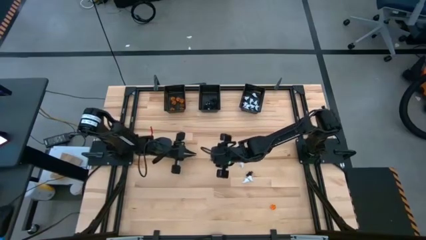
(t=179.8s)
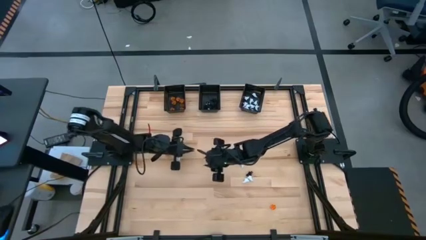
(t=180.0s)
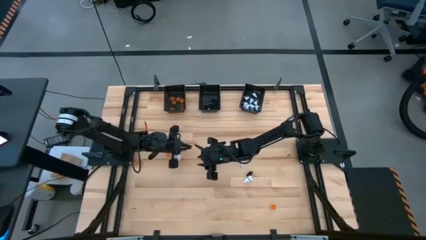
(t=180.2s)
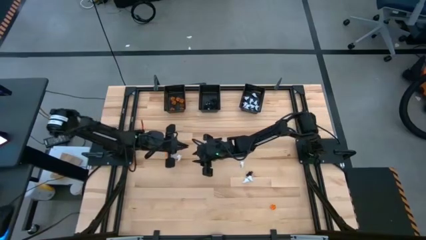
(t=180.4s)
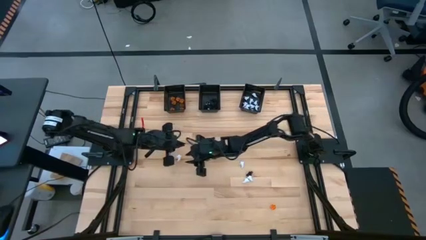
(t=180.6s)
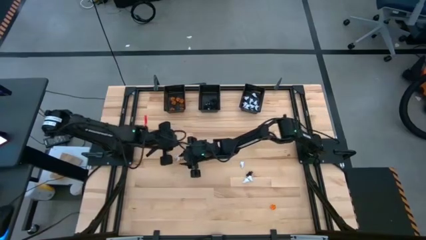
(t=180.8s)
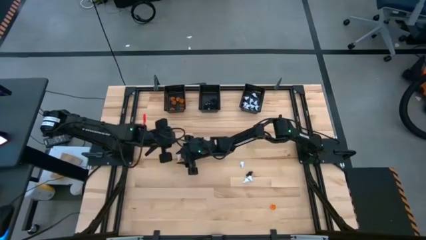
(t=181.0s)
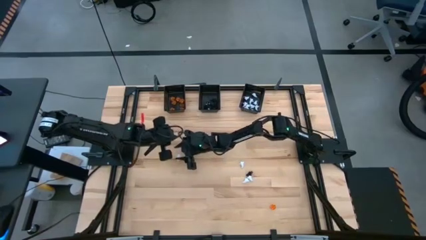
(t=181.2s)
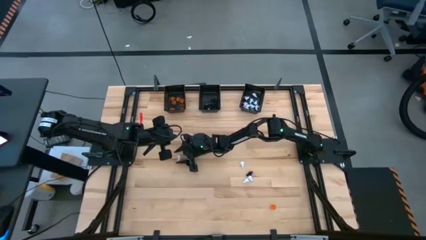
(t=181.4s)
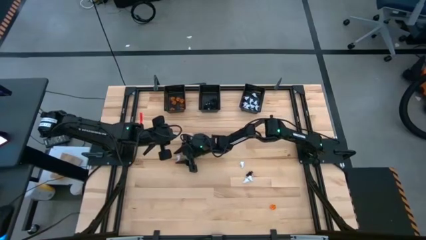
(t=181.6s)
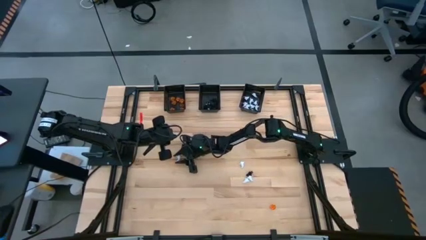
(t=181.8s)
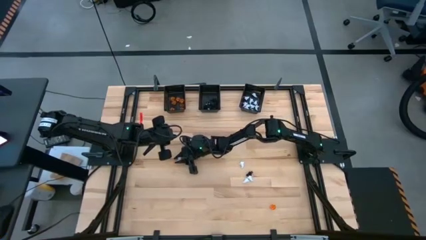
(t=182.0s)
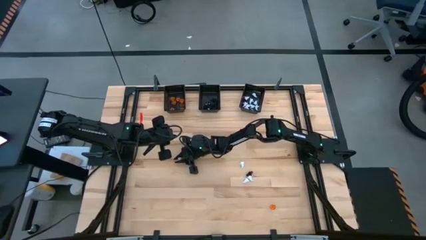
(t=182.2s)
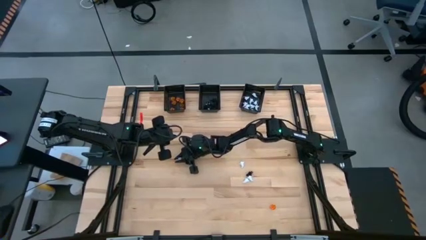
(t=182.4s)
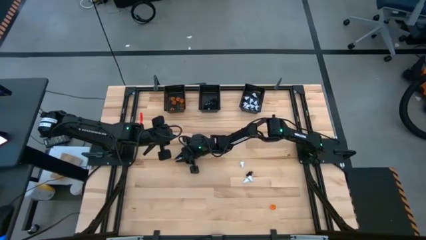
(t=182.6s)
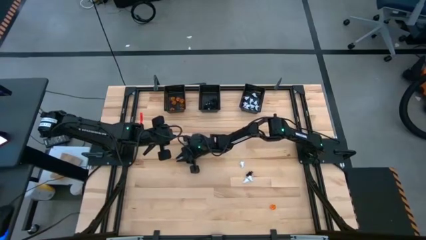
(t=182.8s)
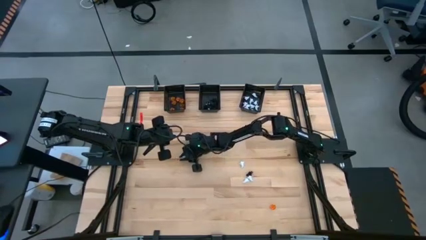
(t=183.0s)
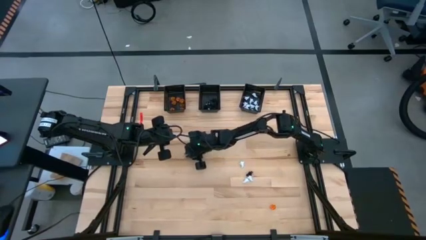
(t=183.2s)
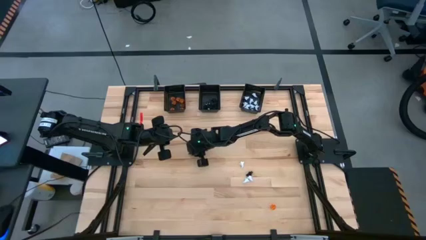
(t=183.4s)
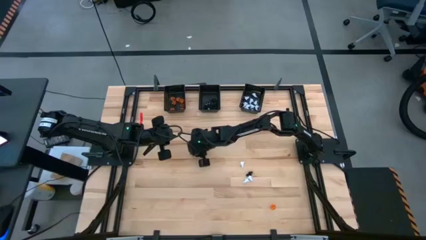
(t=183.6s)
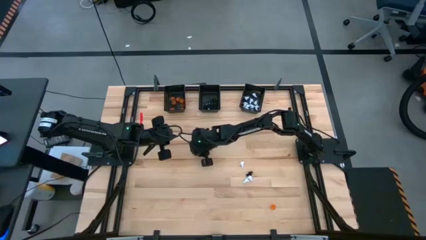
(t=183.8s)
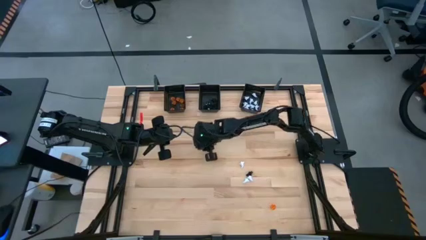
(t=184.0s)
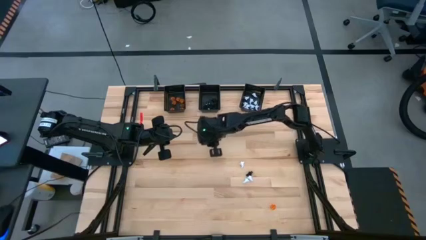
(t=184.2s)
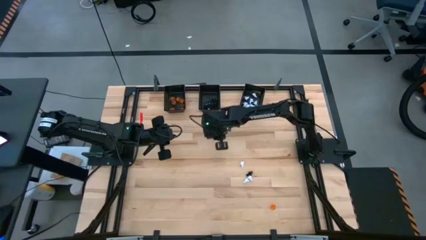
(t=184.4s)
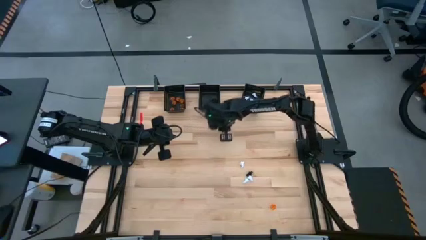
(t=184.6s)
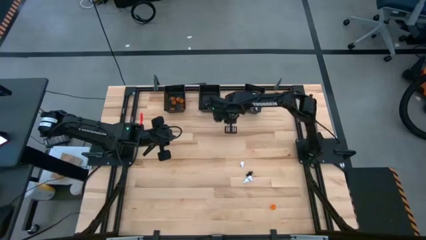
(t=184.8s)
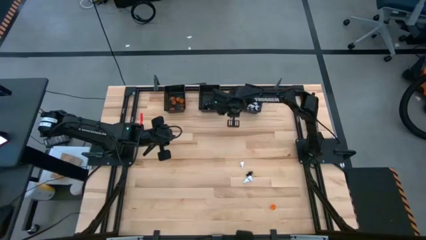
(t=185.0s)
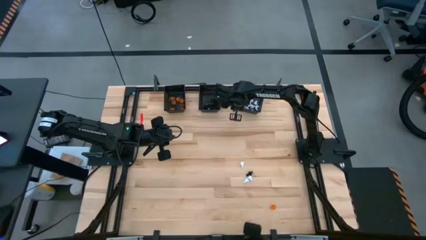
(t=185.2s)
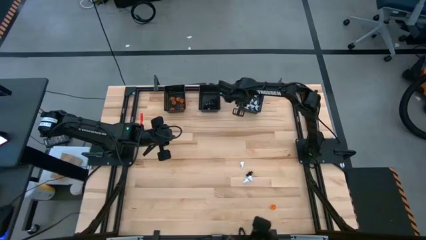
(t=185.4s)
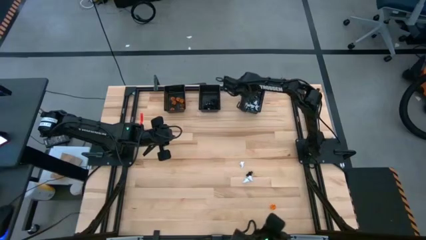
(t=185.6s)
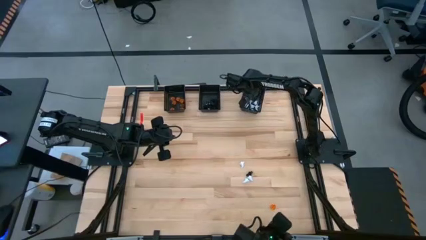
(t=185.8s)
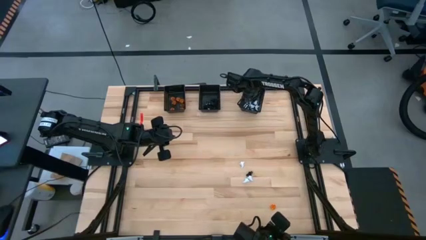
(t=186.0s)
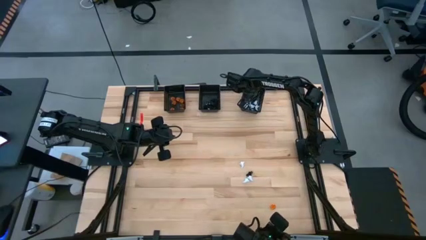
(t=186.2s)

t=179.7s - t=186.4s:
Task: Sort Halloween decoration
Put the white ghost toy into the right black basket

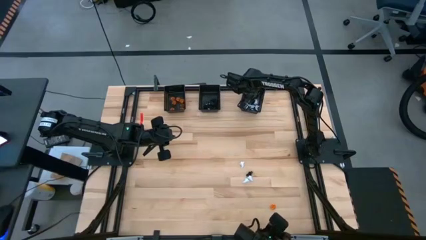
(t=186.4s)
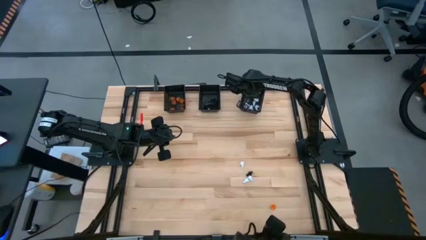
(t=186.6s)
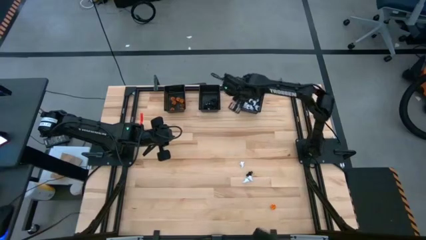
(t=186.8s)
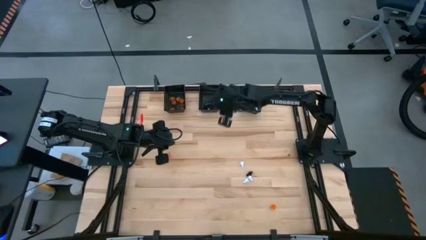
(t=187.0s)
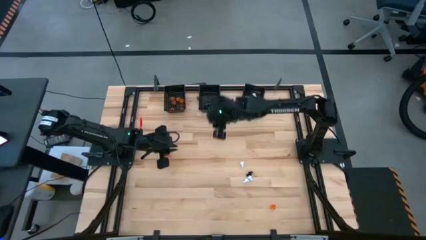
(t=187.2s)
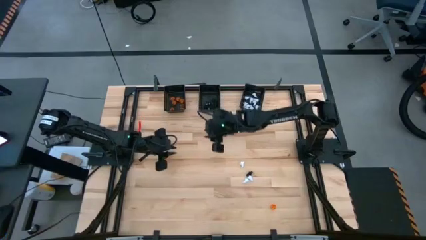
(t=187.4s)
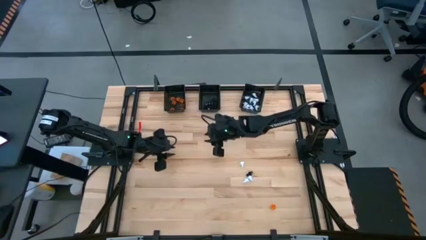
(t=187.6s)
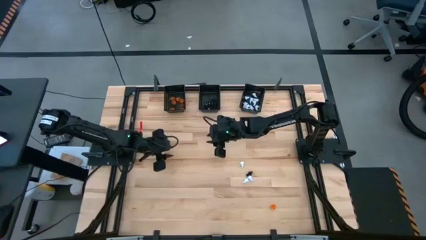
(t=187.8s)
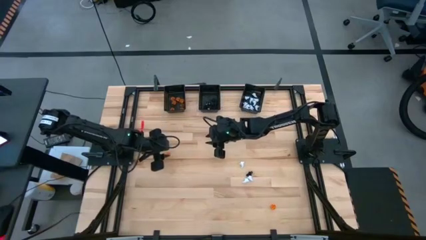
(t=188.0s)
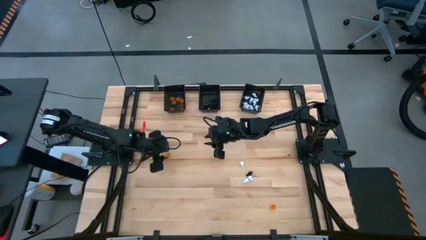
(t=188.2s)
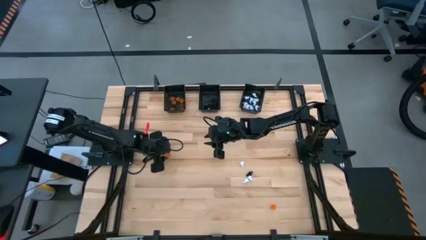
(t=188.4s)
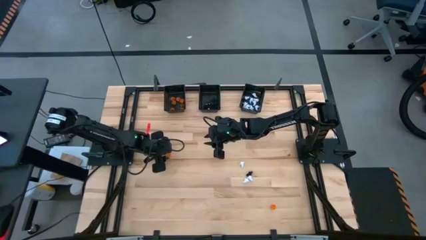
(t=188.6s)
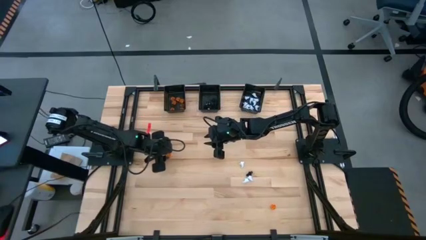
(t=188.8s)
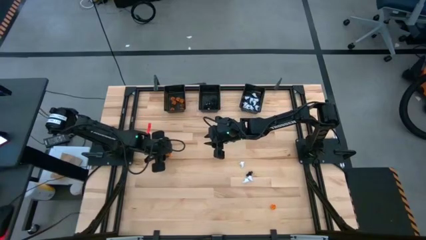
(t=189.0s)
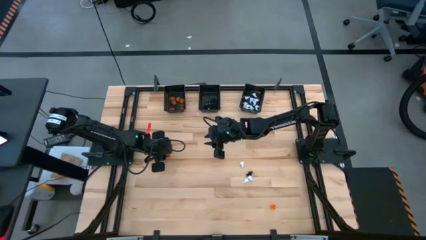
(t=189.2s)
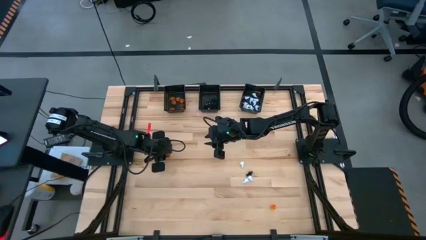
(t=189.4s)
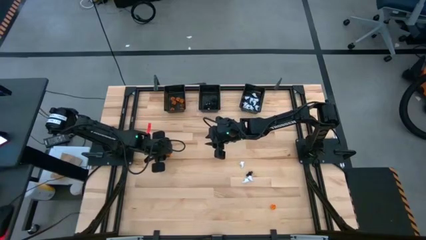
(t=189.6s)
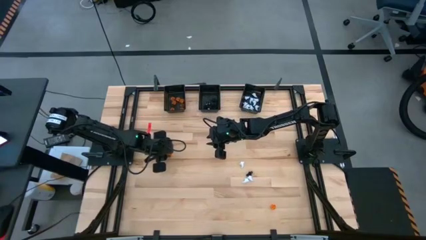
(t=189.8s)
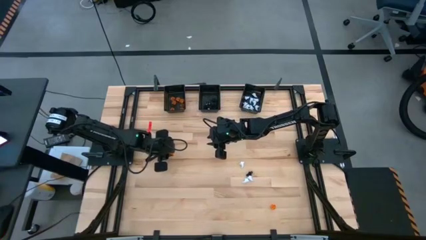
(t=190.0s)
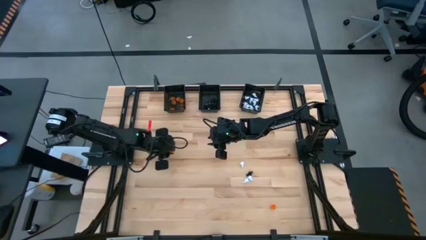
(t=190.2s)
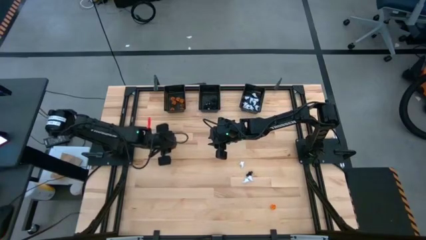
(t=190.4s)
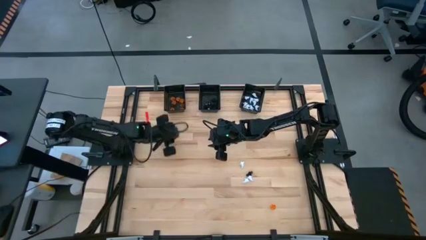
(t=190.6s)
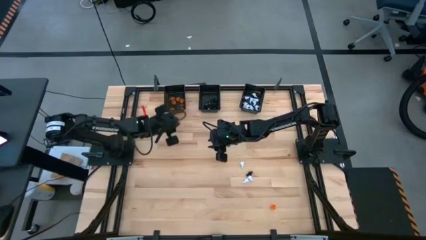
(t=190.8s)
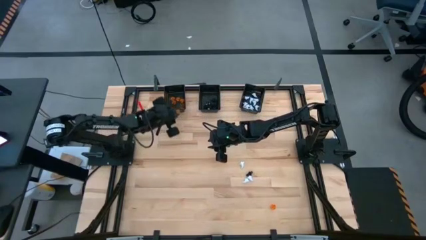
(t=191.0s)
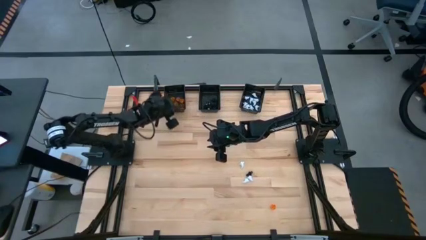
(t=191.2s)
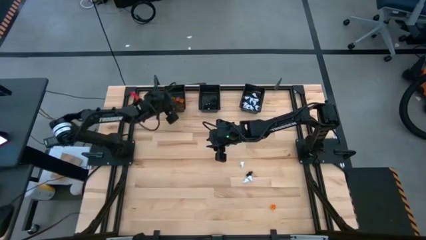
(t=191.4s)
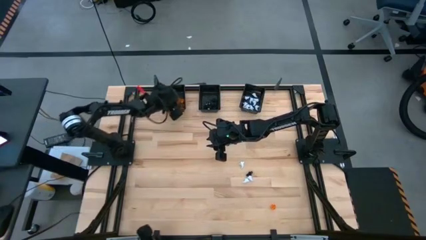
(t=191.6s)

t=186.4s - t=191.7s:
Put the orange pumpkin toy into the left black basket

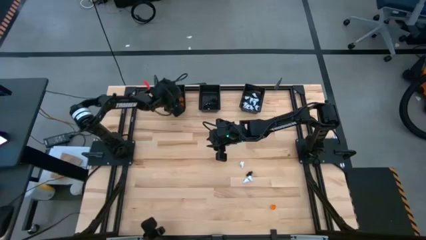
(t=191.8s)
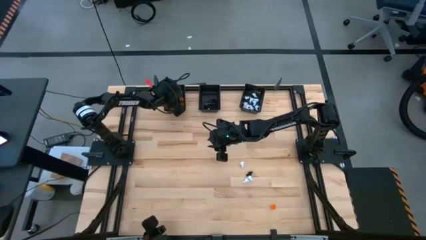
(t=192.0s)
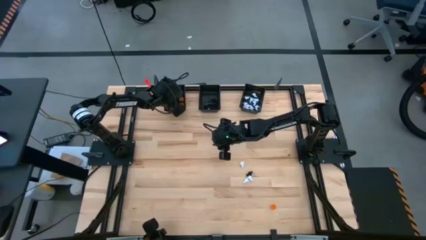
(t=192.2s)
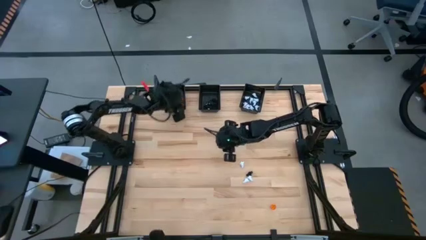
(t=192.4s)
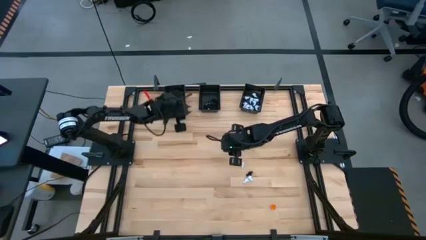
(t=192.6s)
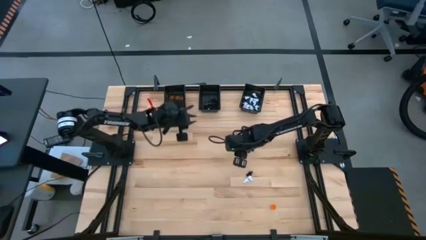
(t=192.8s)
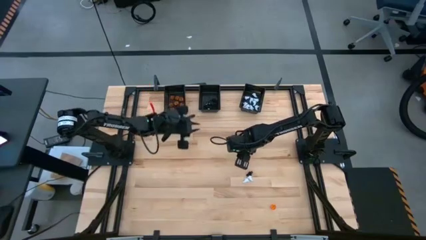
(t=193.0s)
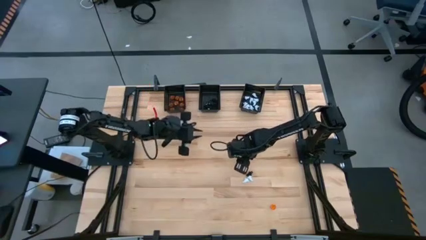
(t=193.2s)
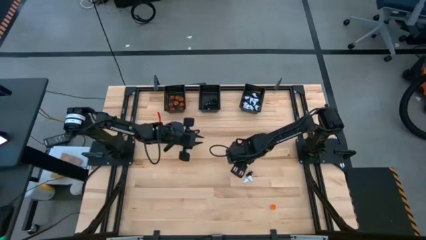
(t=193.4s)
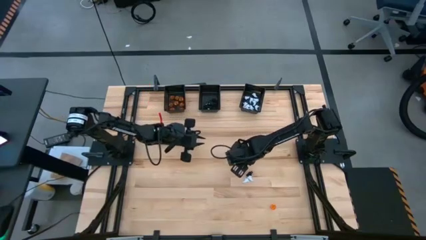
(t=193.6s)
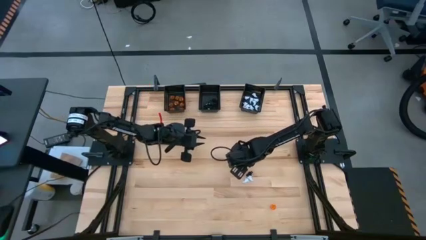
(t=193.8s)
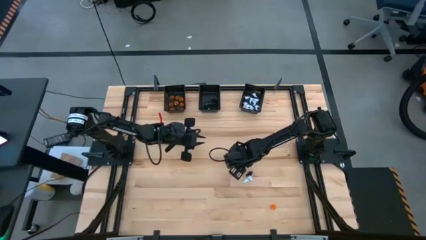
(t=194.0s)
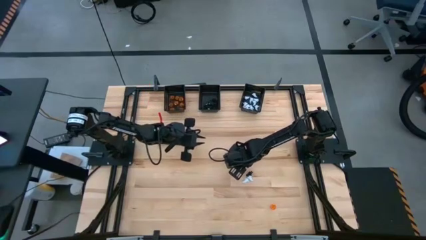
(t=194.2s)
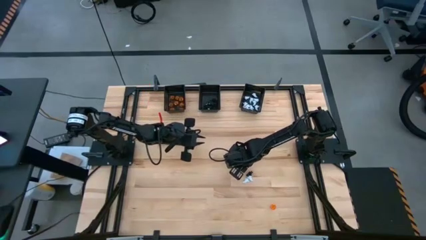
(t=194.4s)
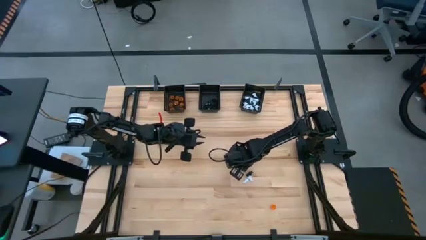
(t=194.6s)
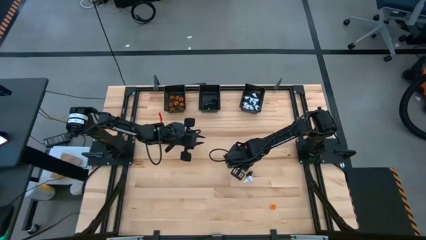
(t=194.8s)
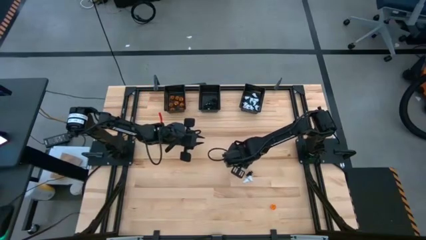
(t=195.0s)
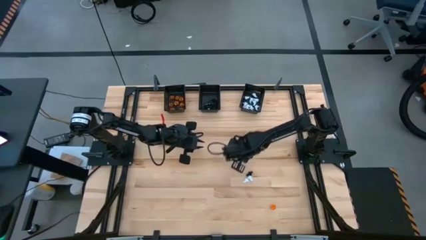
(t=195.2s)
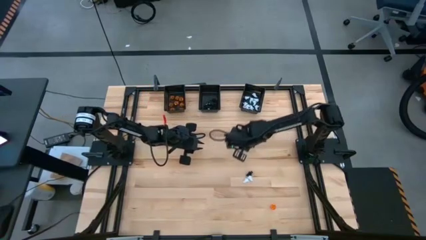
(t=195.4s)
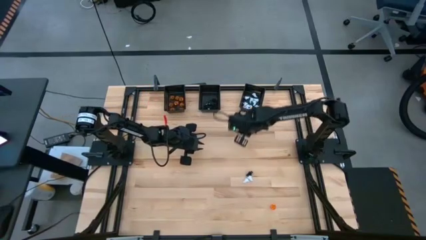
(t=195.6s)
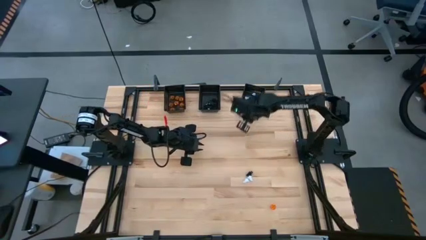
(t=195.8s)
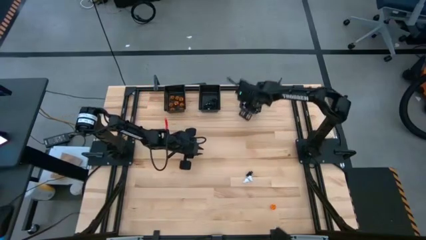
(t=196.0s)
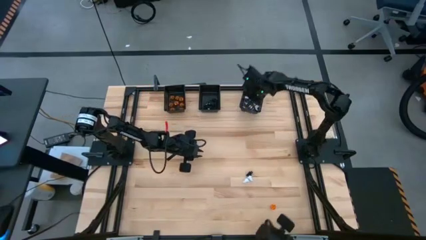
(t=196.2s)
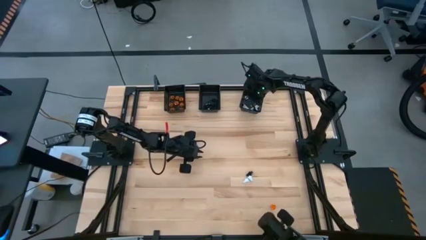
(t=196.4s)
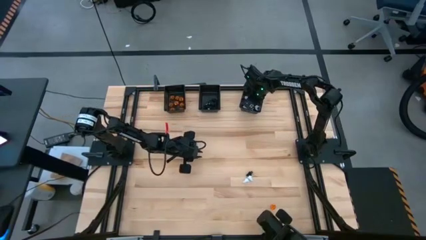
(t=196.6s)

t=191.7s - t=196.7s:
Put the white ghost toy into the right black basket
